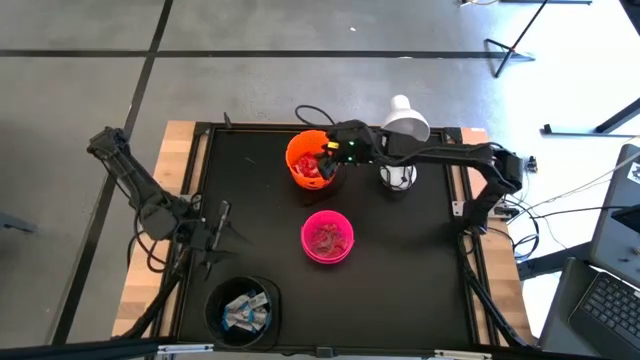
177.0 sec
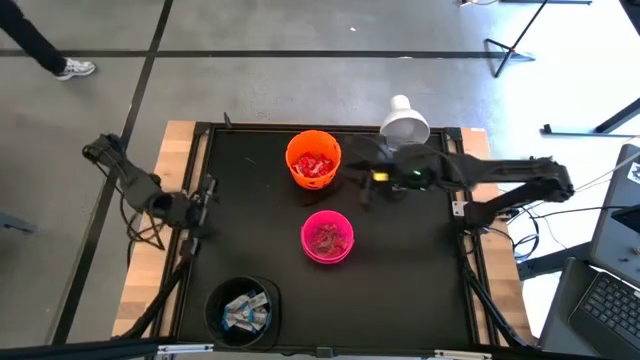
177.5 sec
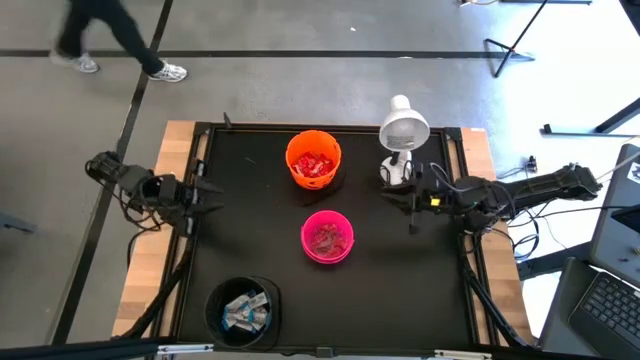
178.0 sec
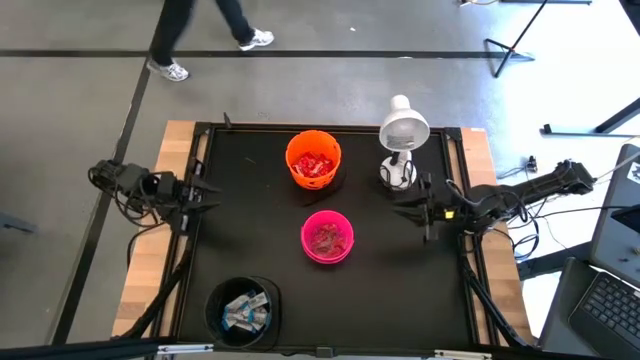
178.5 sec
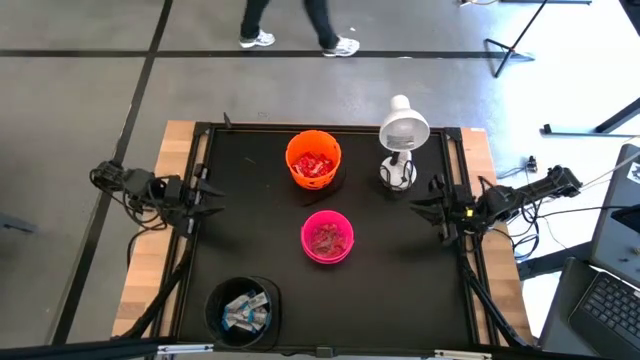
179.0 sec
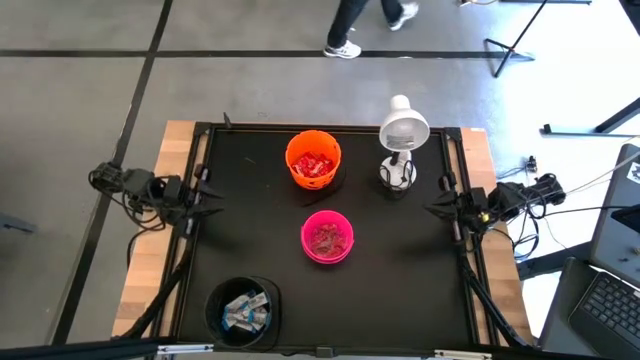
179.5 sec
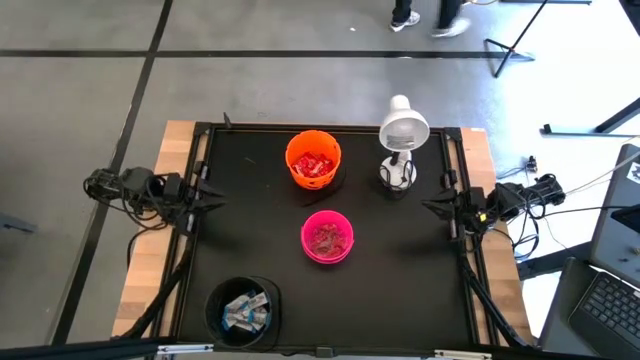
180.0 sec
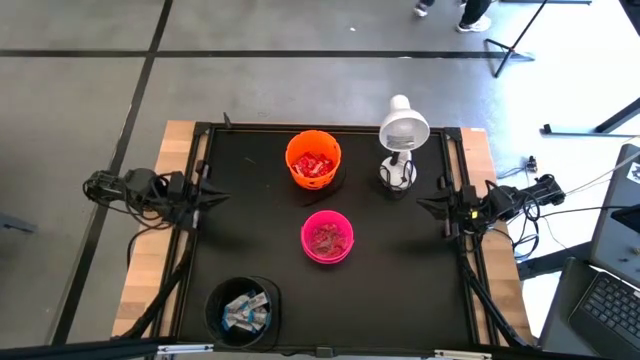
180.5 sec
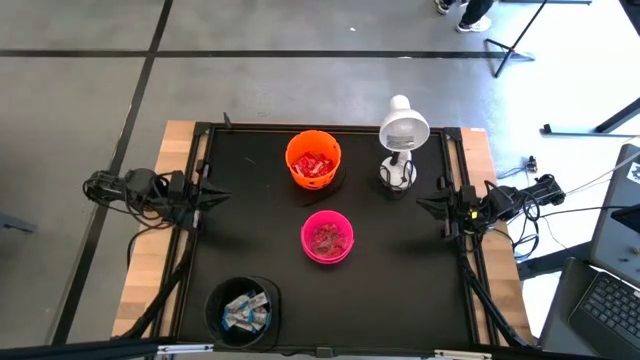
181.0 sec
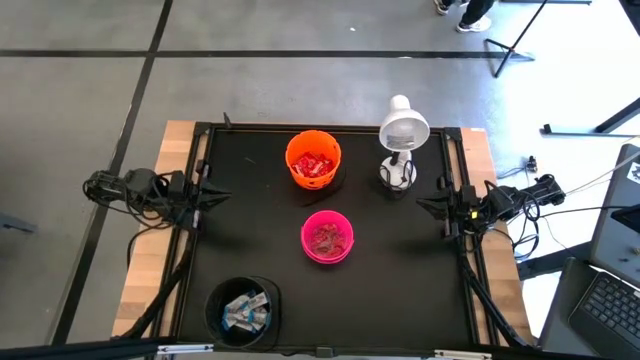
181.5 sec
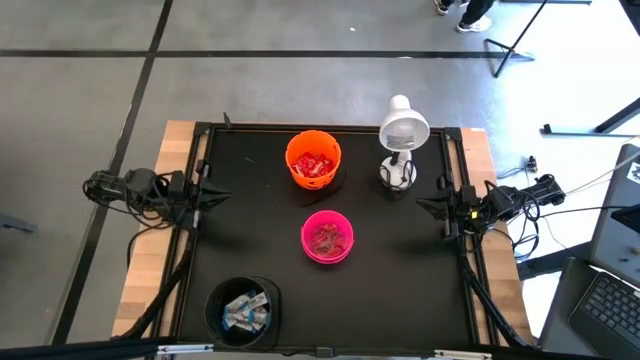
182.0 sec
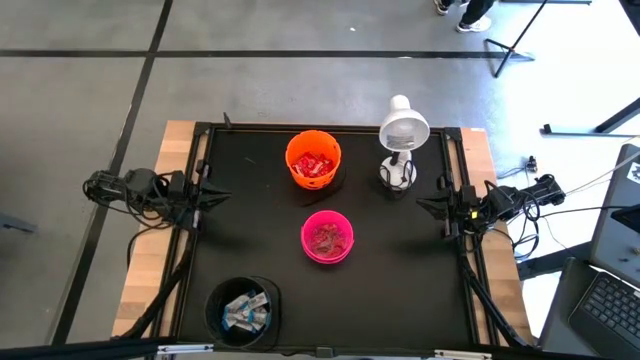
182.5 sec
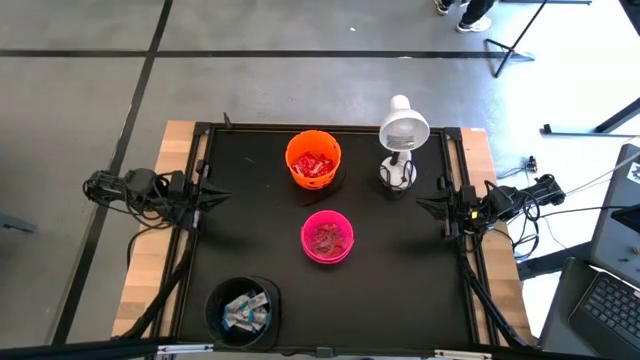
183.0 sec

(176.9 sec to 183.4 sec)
Task: Sort candy
Return to Home Position

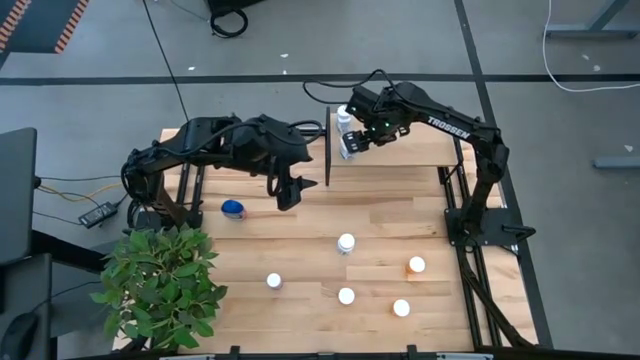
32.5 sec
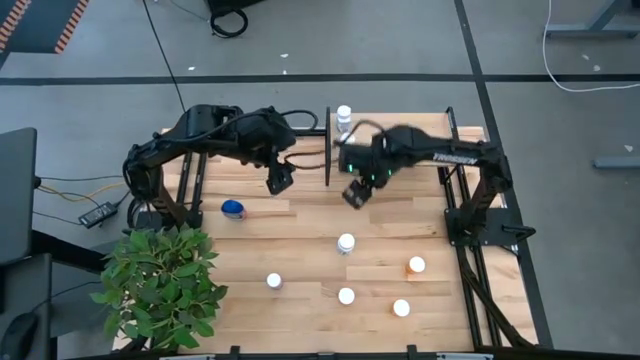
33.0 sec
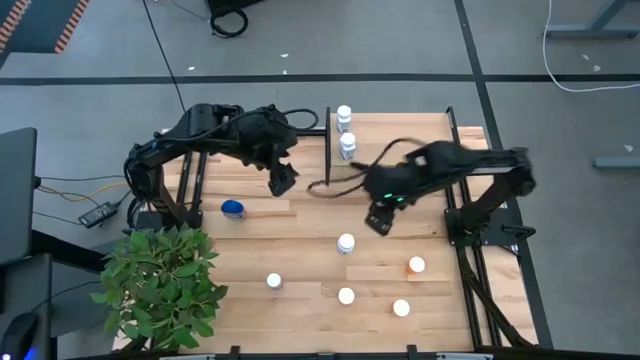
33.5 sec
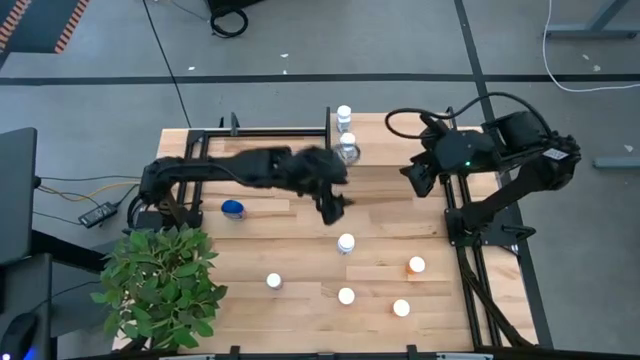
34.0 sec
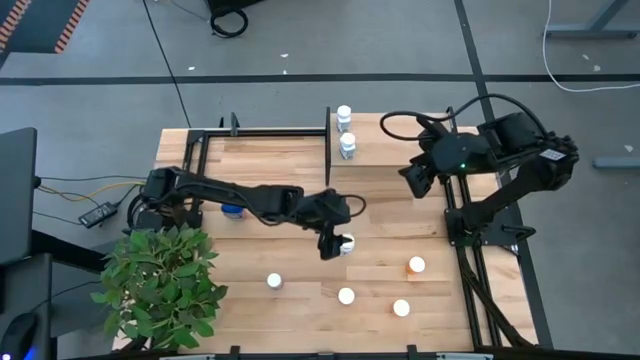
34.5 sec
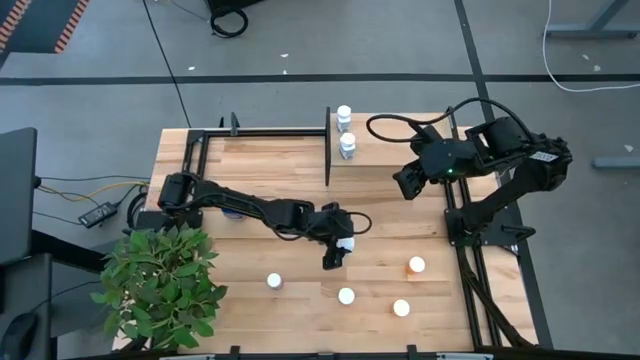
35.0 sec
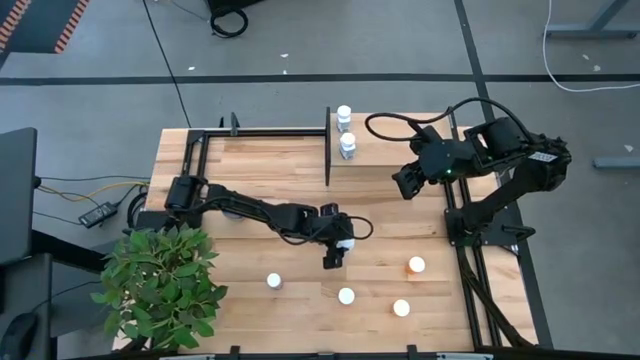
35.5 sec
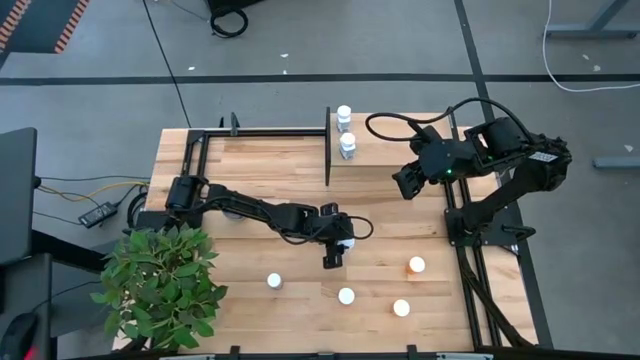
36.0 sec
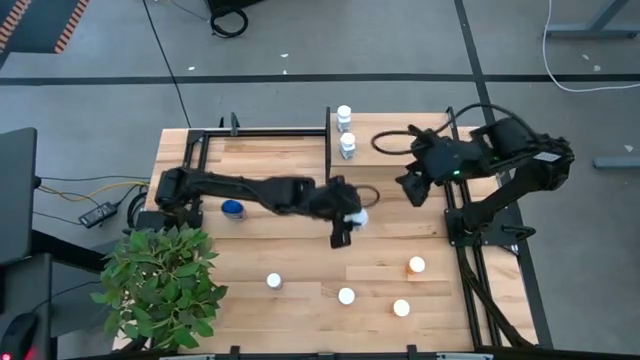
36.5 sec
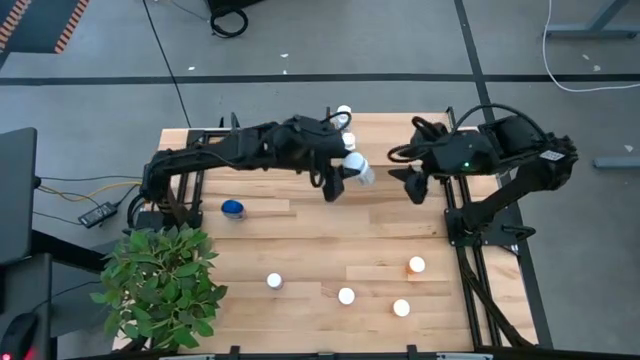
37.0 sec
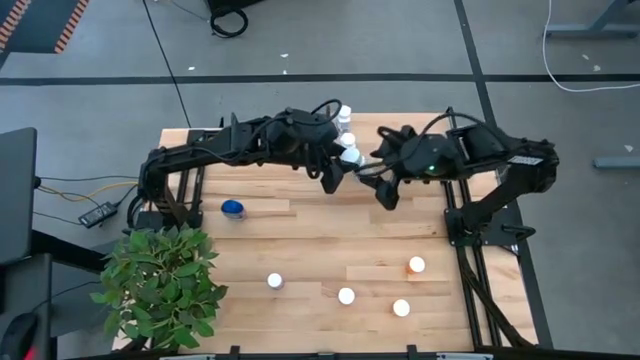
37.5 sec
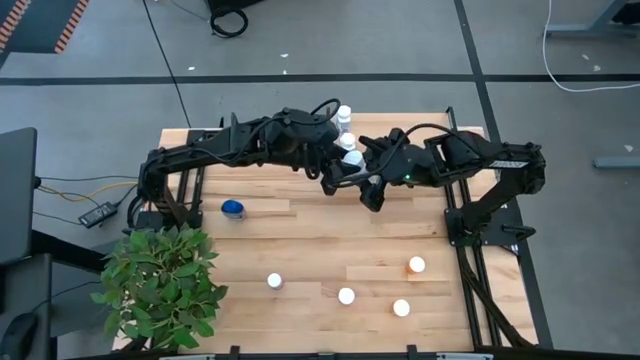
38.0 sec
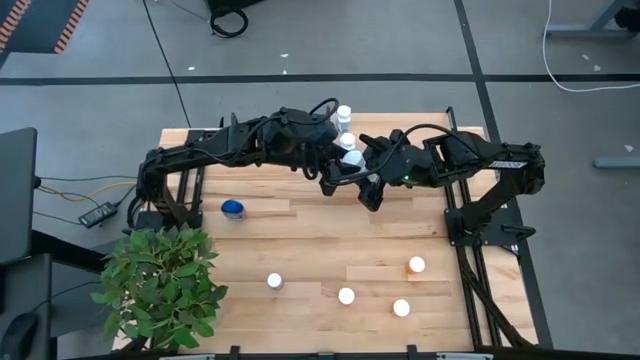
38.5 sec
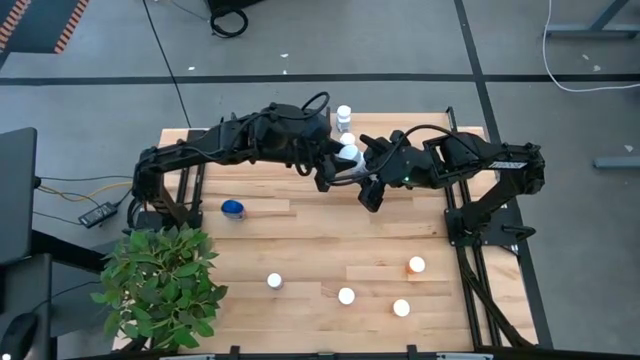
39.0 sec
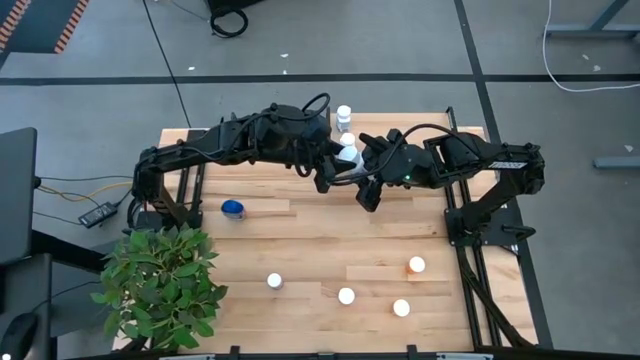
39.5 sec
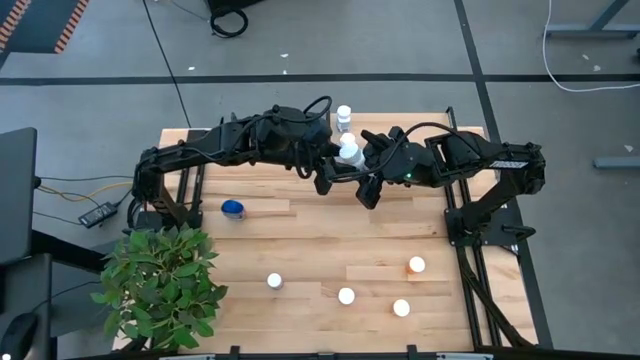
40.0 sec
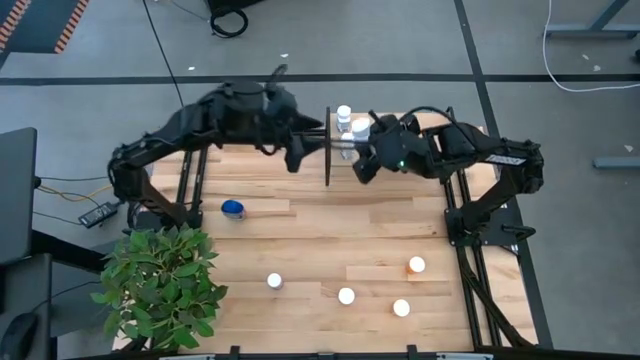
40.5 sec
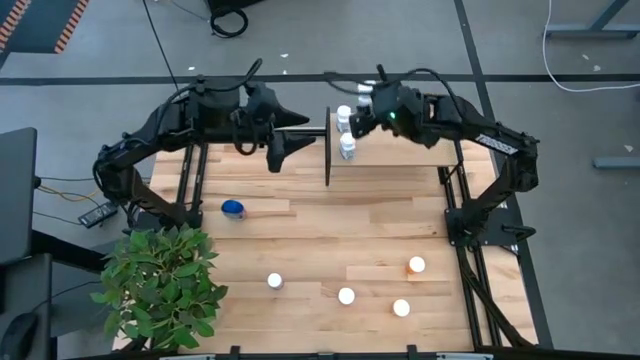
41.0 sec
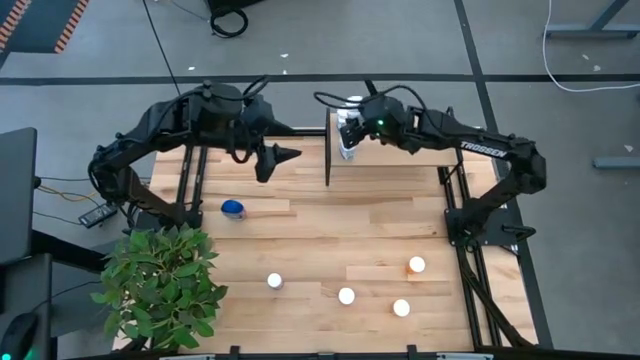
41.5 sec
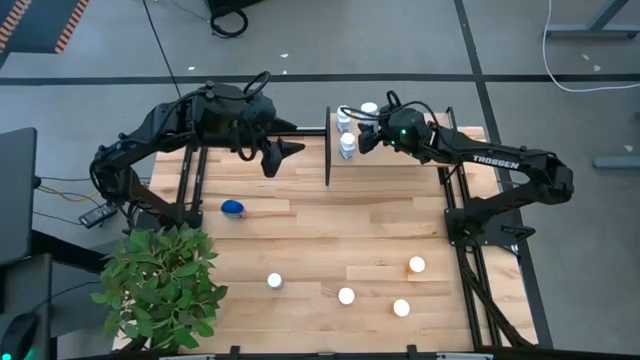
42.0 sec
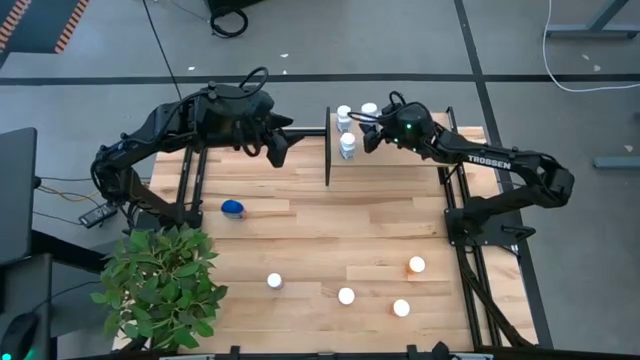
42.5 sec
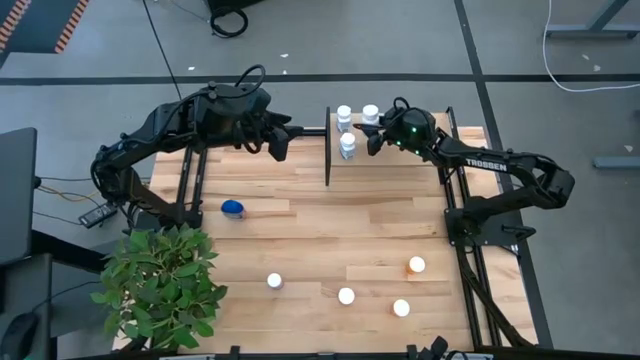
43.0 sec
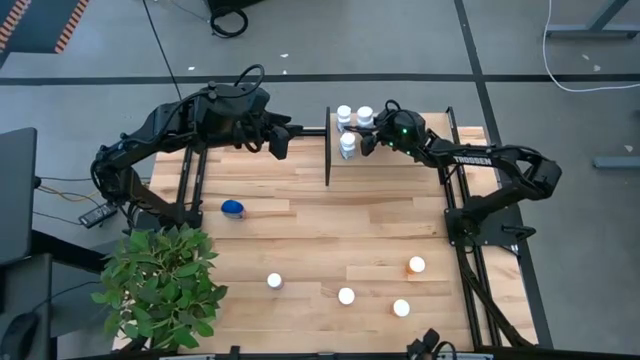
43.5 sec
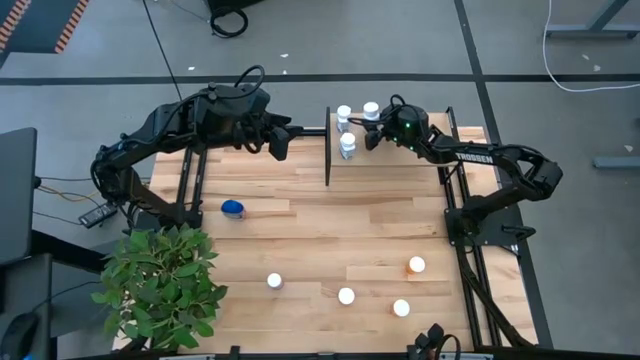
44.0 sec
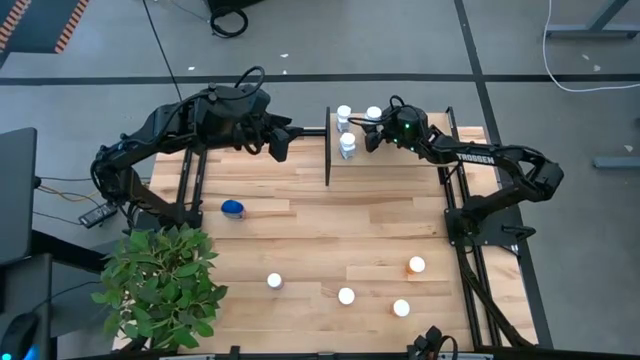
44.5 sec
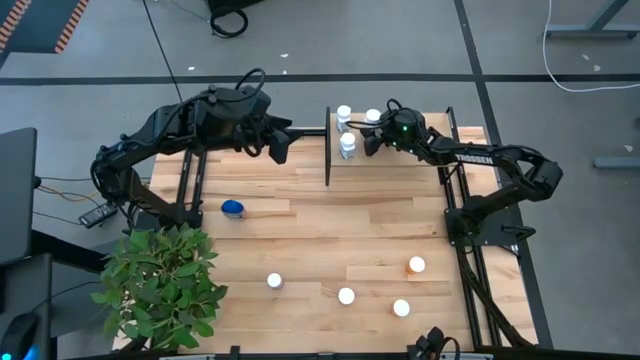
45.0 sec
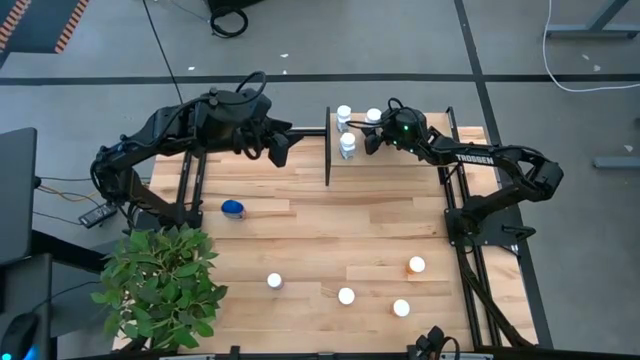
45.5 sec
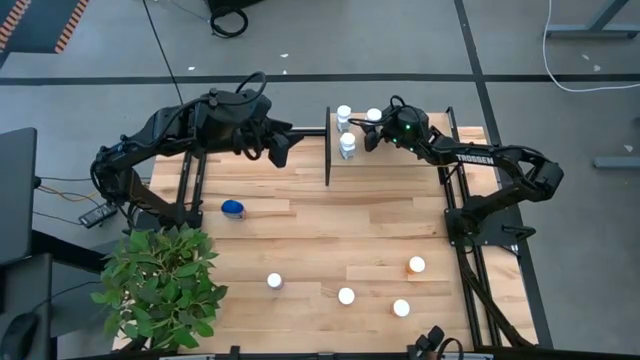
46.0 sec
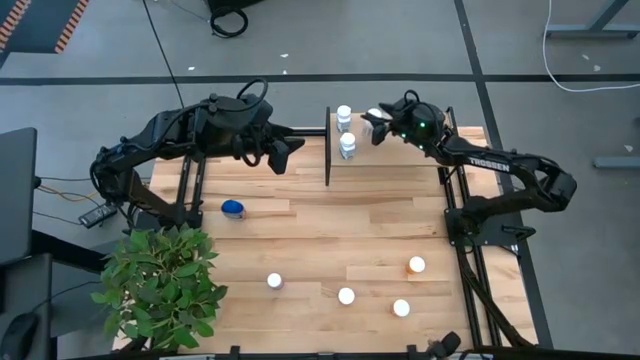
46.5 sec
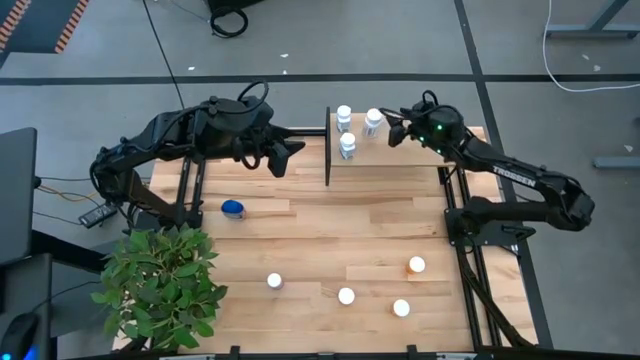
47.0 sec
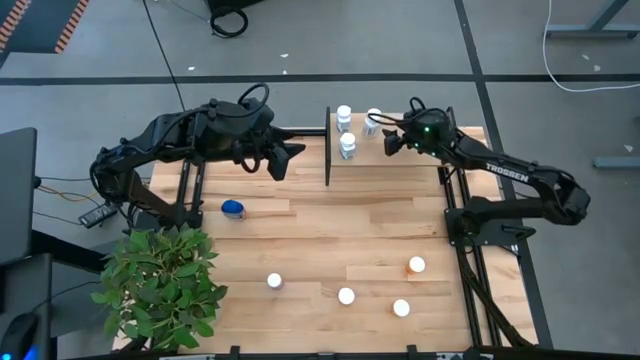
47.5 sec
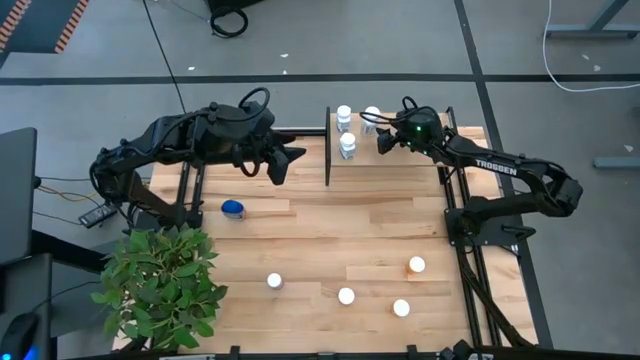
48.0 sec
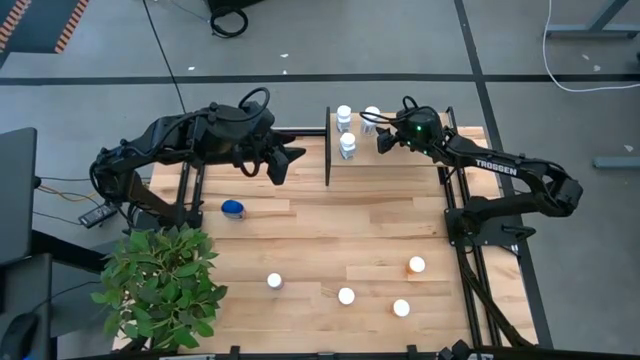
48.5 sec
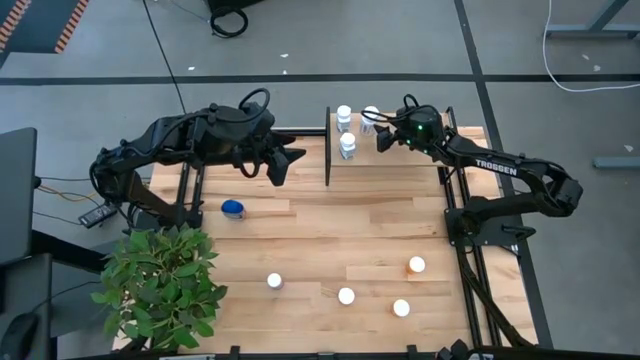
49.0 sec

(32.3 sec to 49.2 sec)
Task: Pick and place medicine bottles onto shelf by color
Put the white green medicine bottle on the shelf
